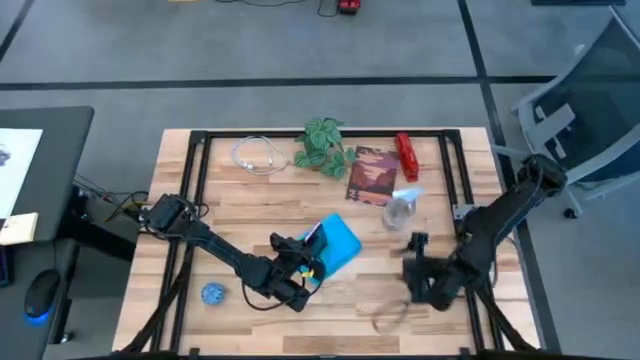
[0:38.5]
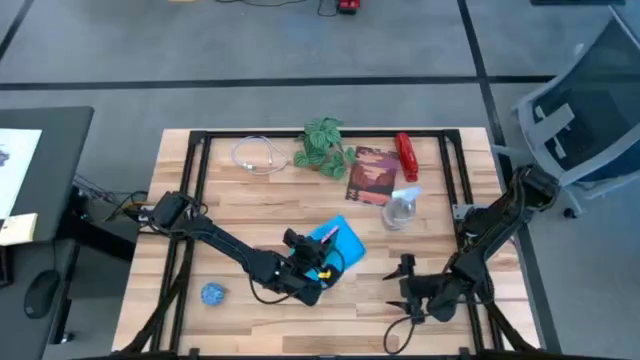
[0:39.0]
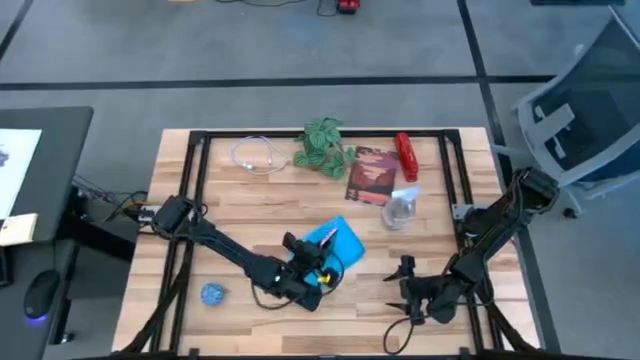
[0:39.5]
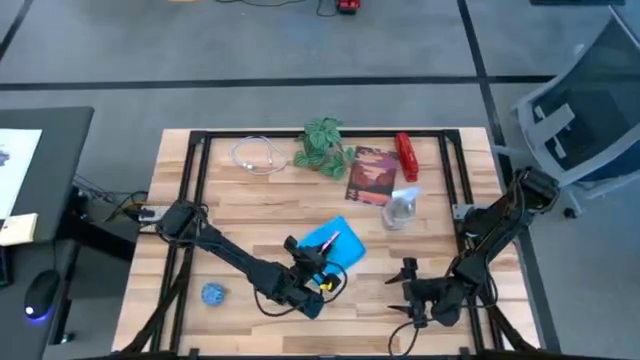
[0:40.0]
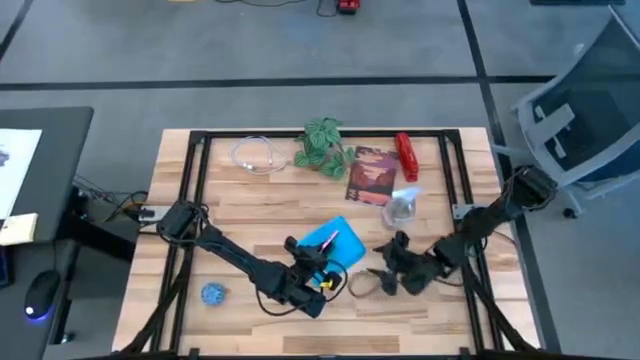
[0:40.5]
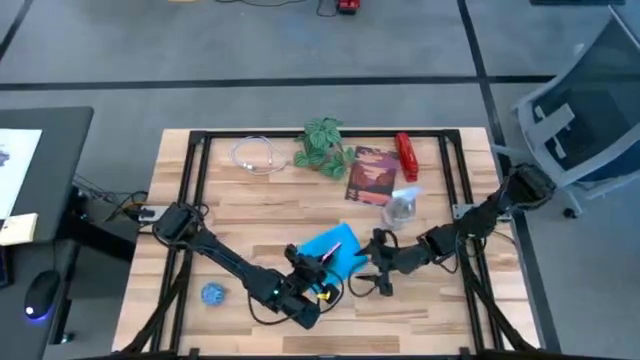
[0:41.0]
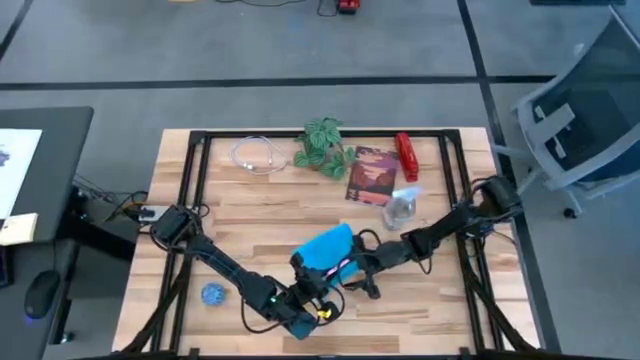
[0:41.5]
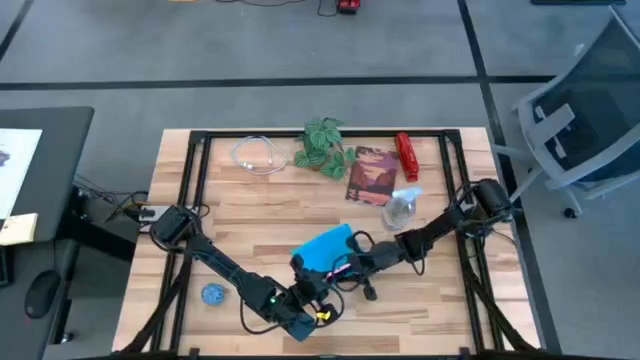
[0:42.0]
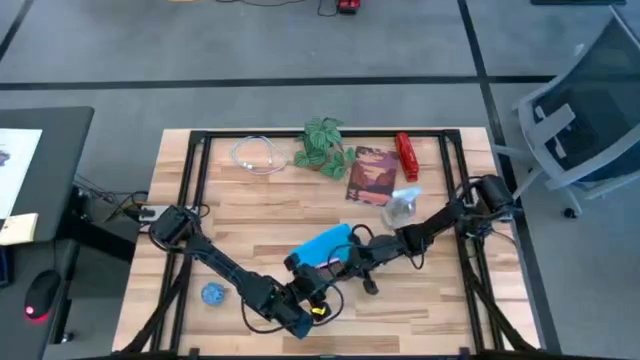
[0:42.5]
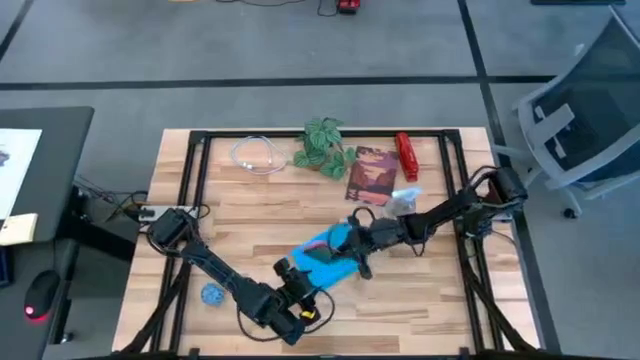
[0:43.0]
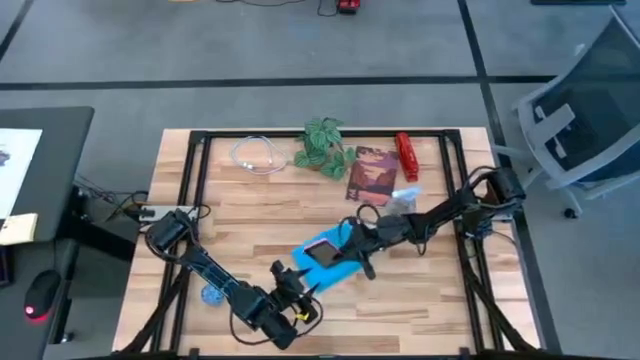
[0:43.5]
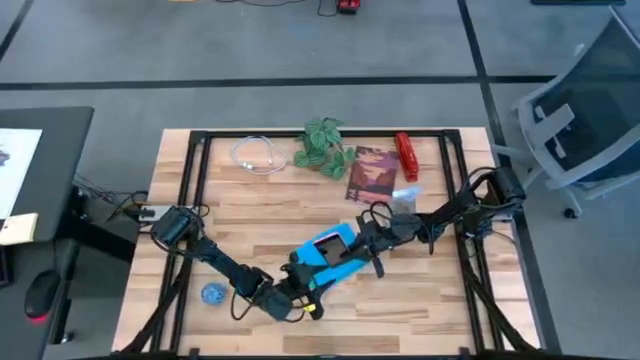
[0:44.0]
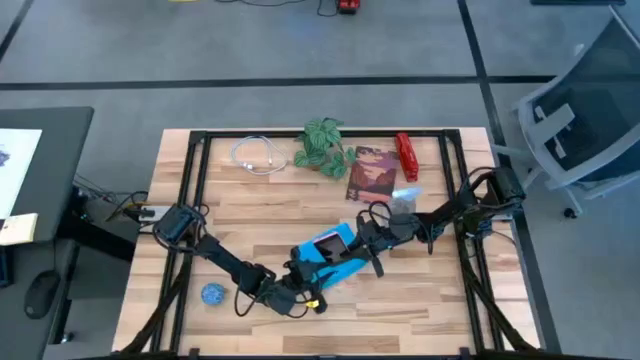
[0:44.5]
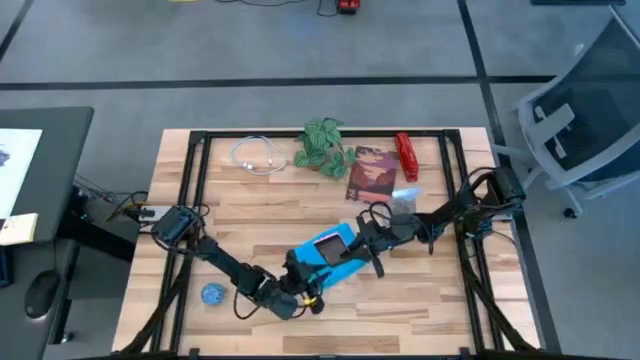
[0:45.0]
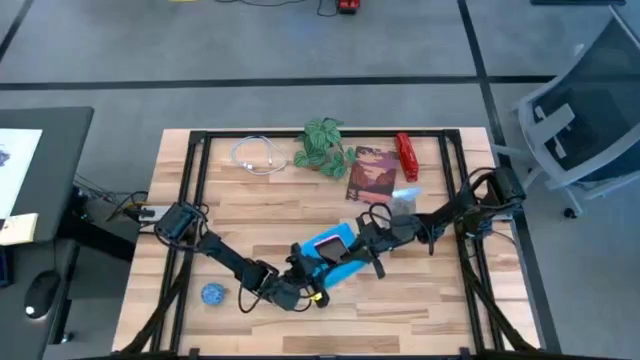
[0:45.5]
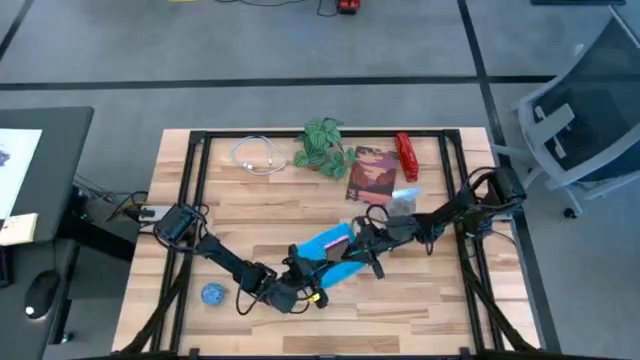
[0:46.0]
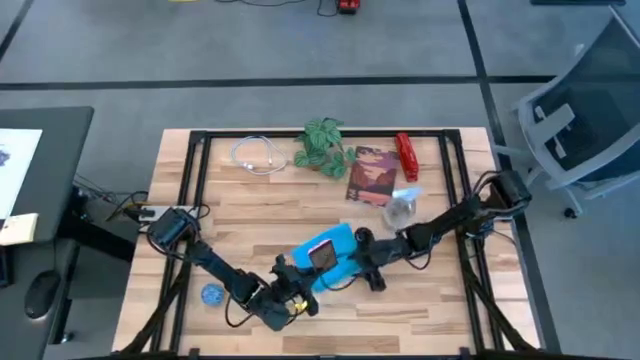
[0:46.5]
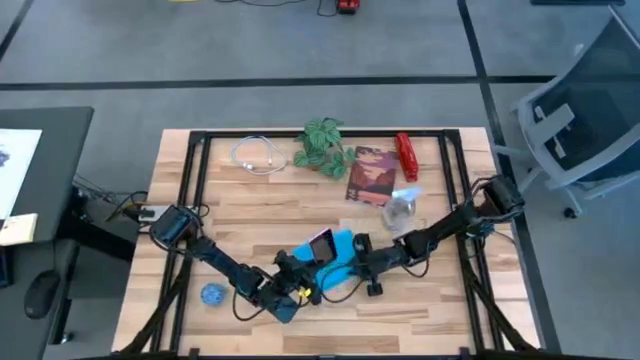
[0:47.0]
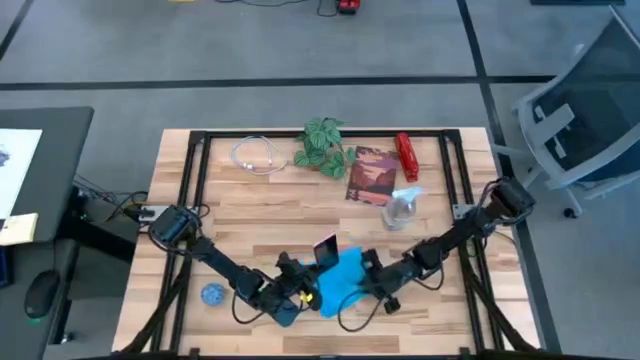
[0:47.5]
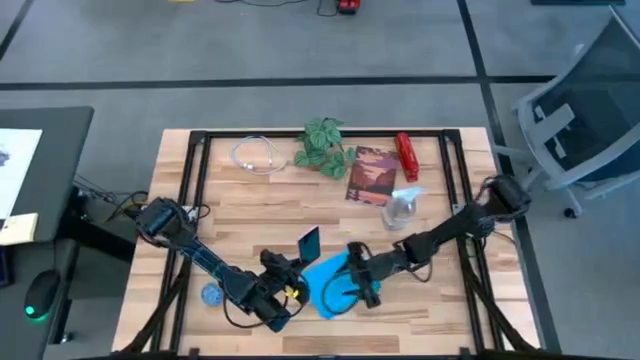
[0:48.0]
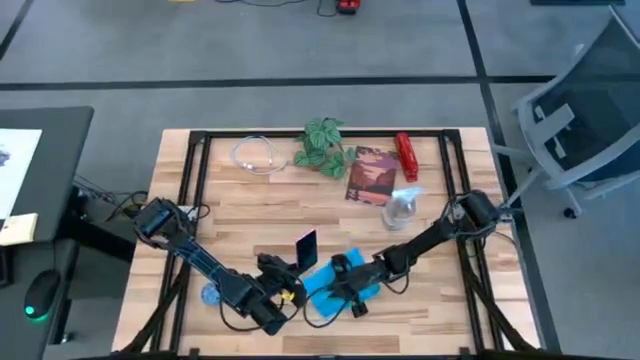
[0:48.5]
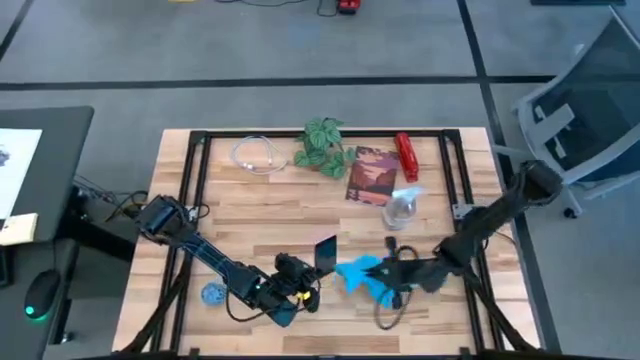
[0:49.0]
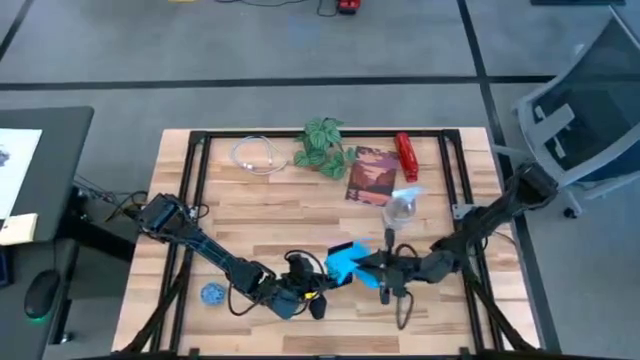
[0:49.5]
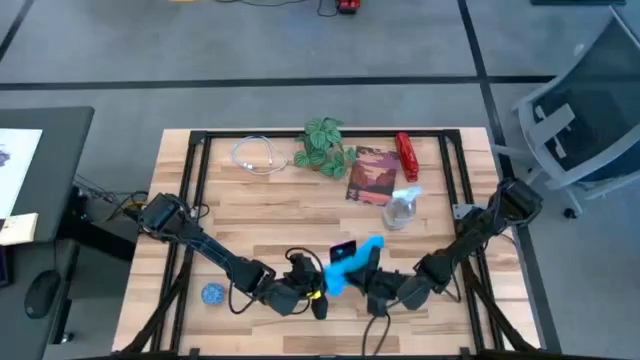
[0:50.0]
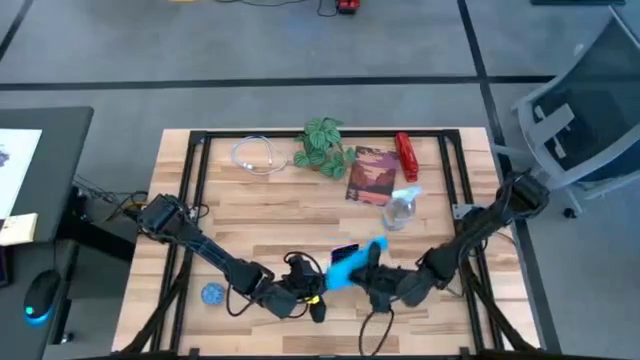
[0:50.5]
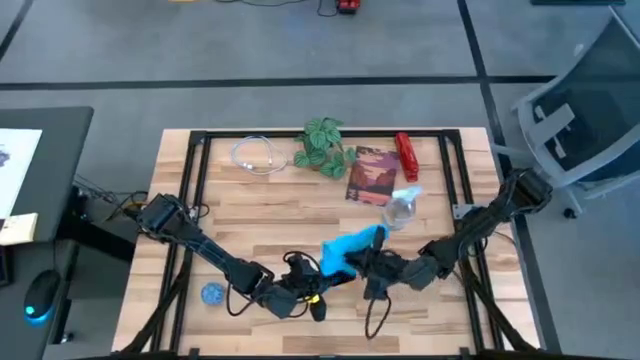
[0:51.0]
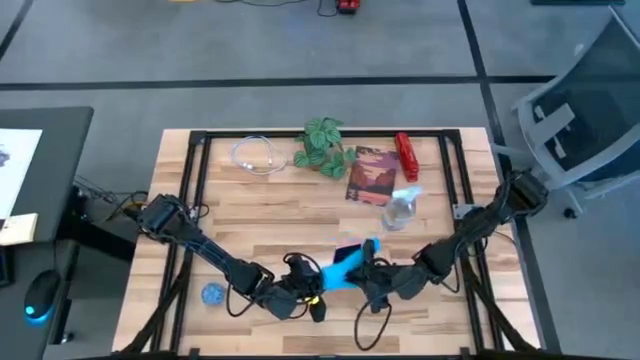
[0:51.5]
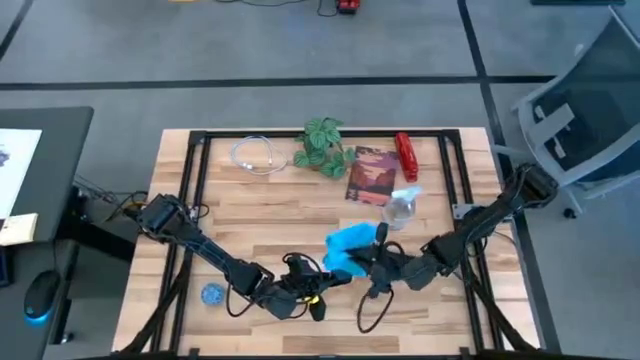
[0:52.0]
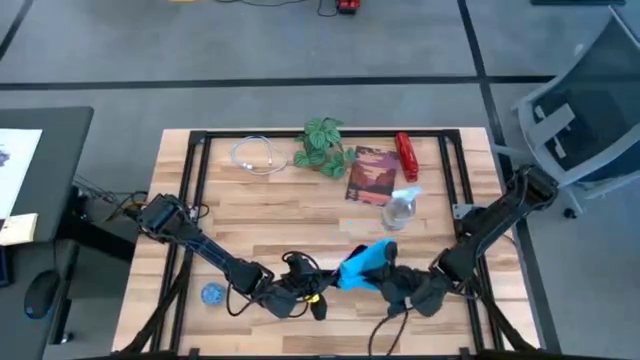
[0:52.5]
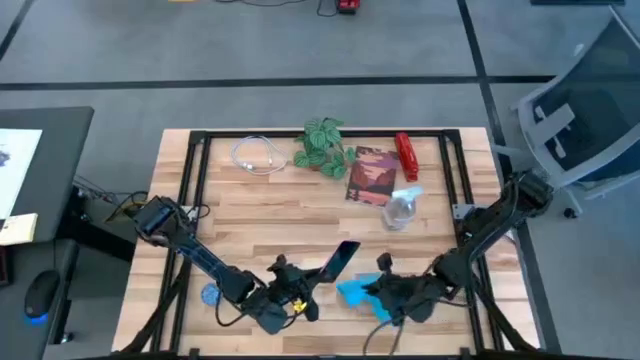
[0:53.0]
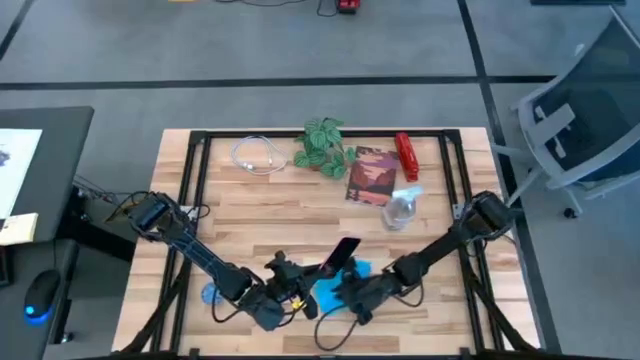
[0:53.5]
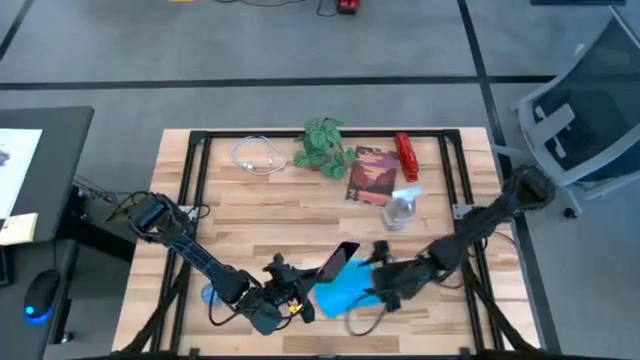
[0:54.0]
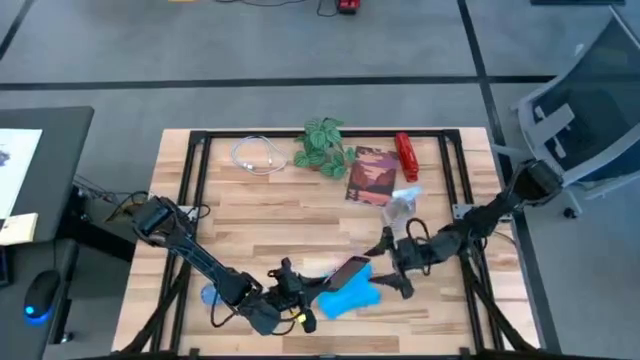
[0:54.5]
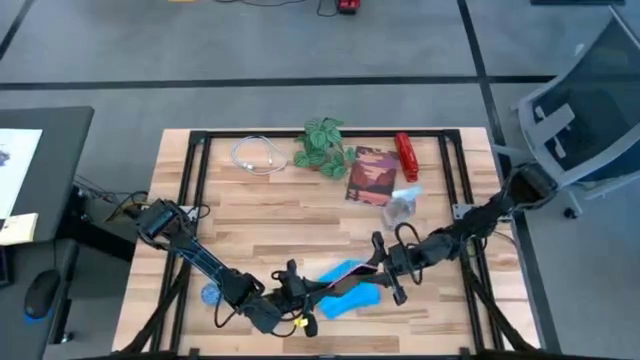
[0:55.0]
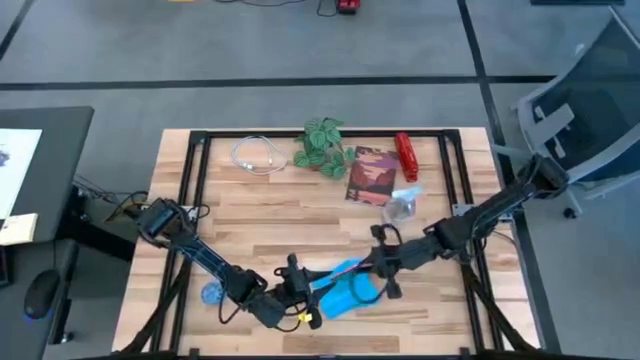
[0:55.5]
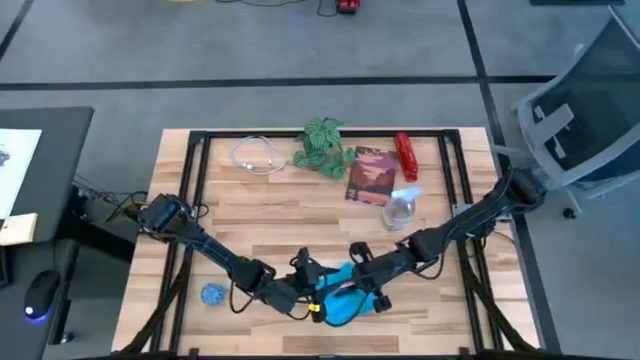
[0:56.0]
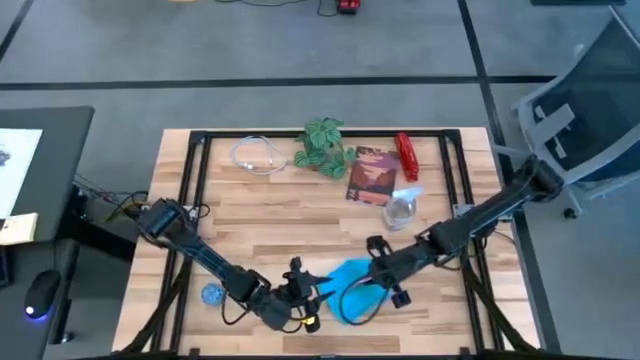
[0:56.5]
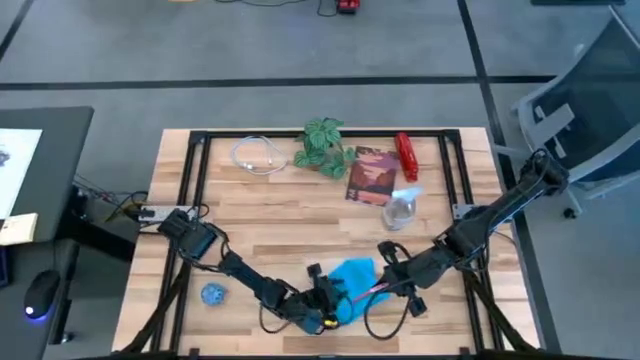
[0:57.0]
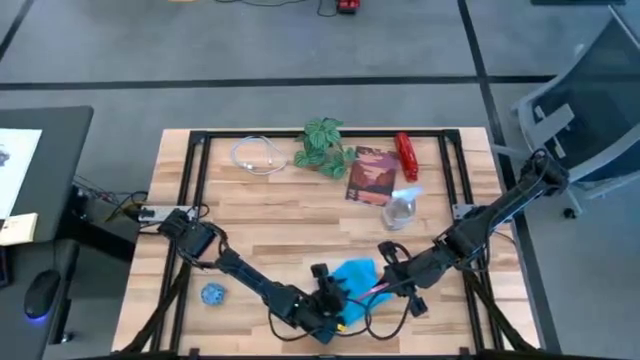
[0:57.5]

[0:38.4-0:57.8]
Task: Apply microfiber cloth
Wipe the front of the pink cellphone with the blue microfiber cloth
